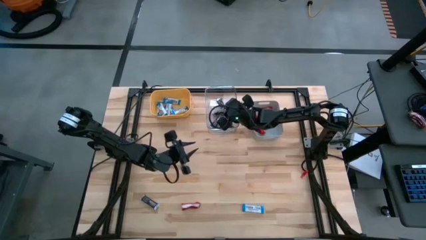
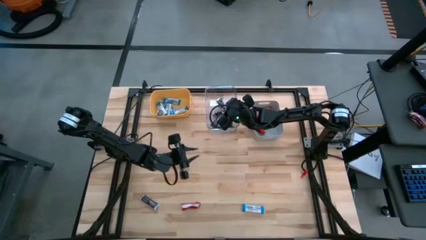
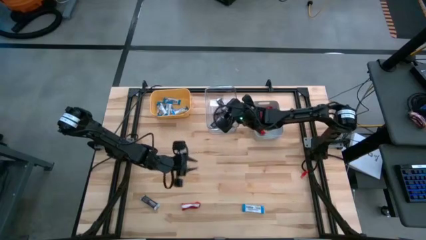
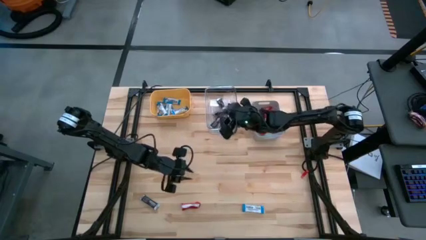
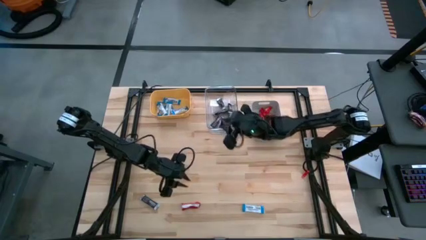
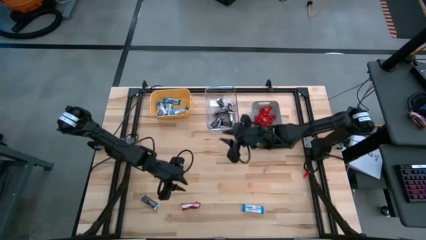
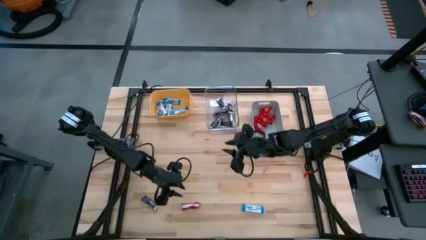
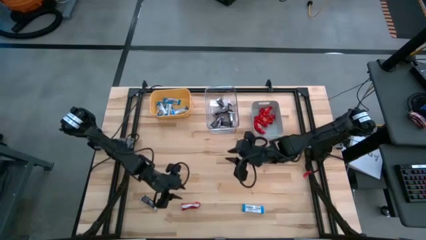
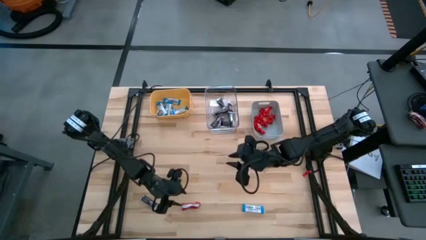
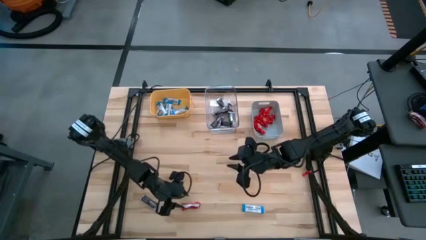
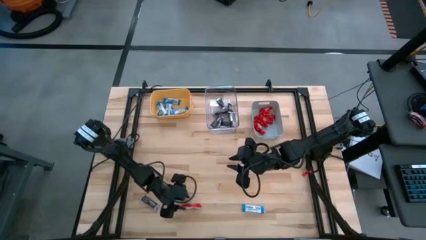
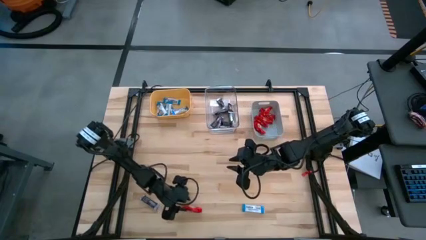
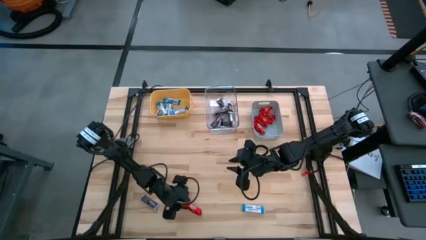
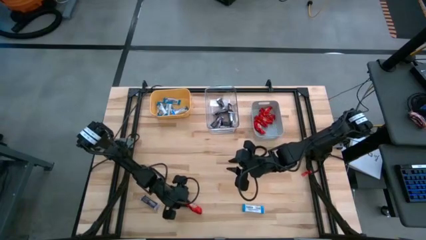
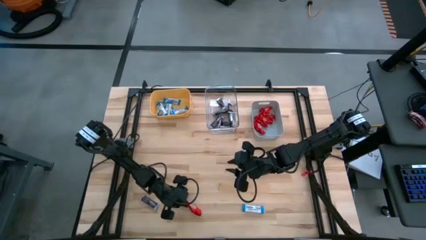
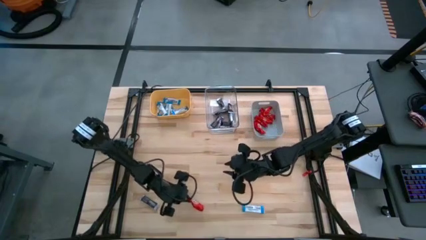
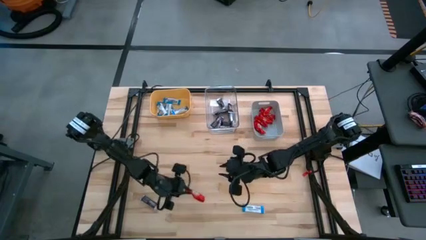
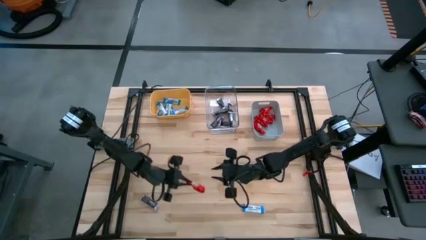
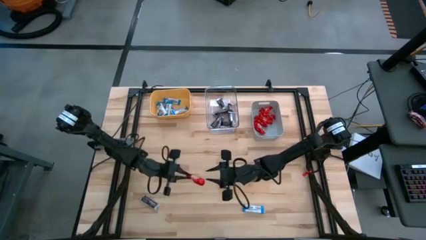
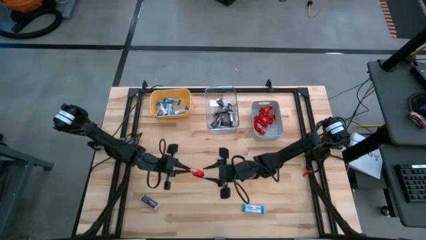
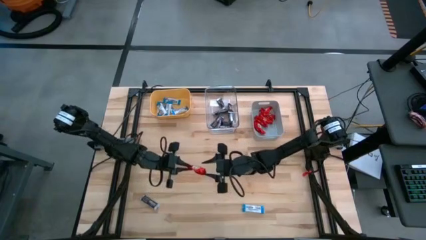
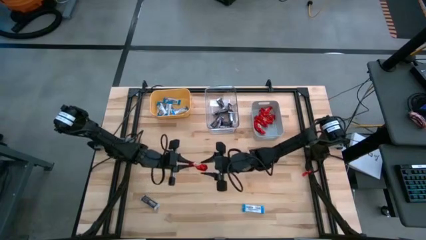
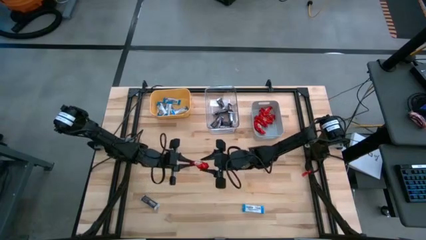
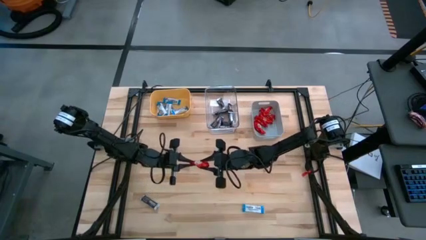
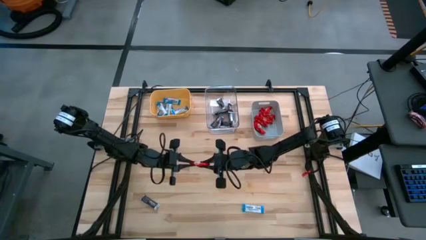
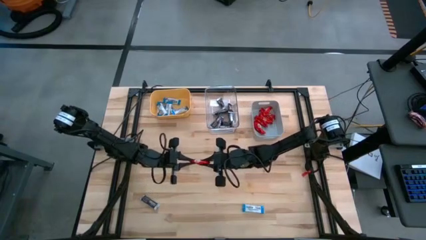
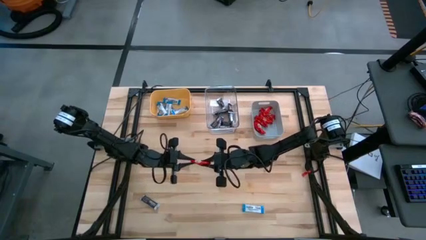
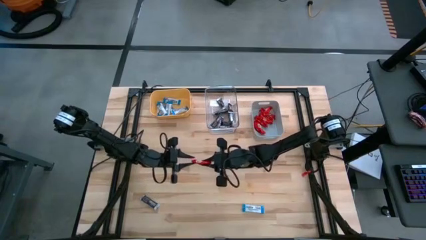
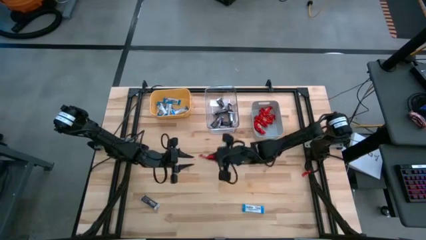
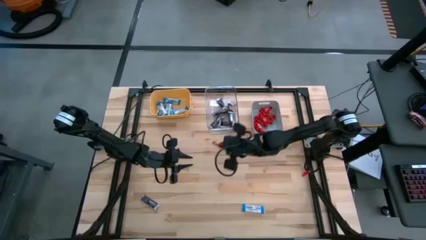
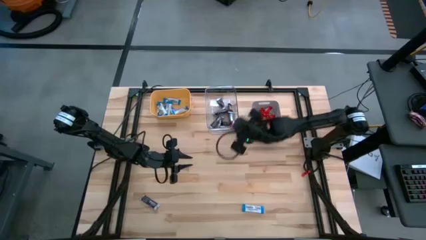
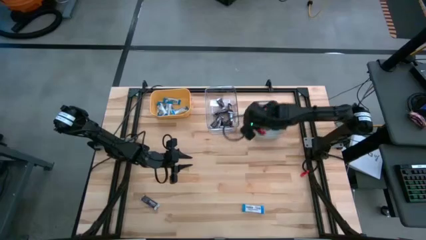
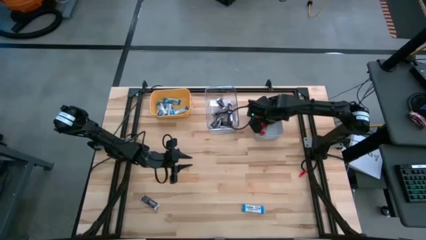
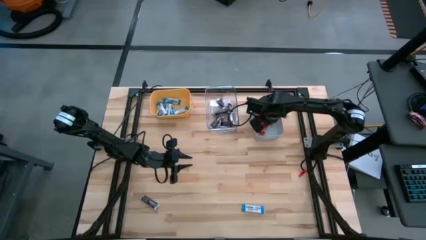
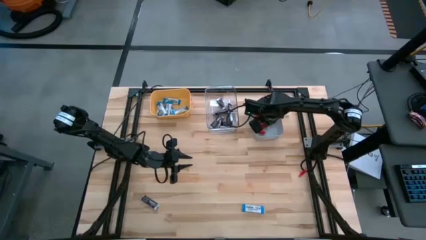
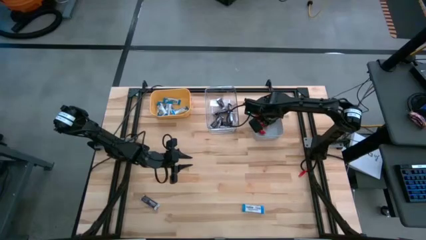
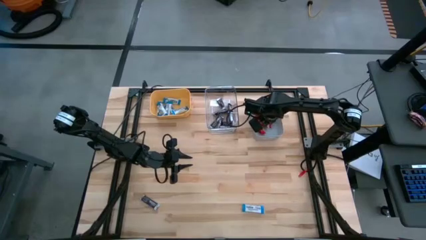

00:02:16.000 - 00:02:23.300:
Task: Sort candy
Put the red chocolate in the gray bin

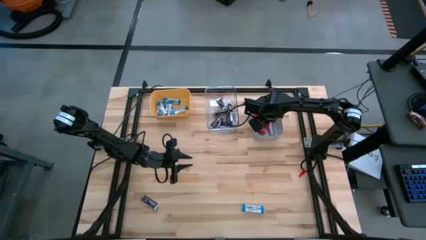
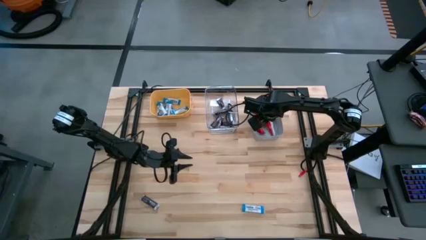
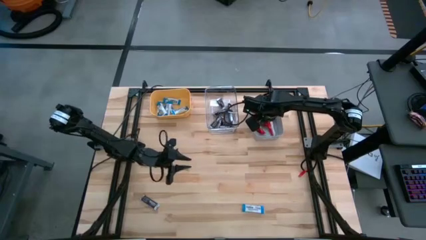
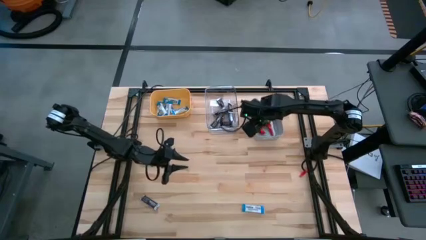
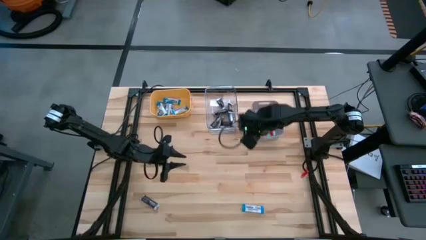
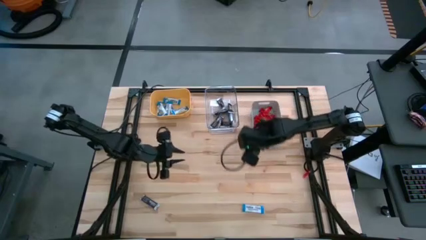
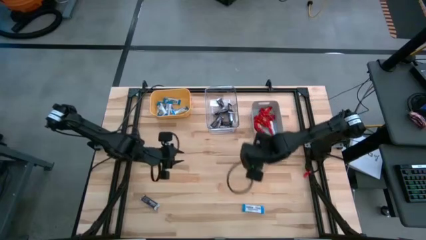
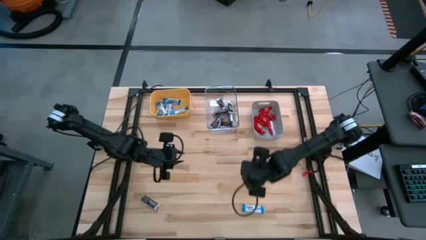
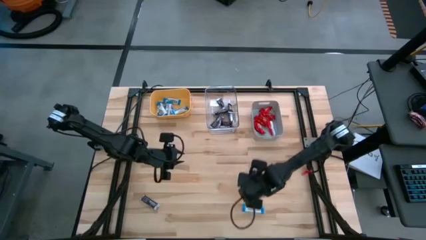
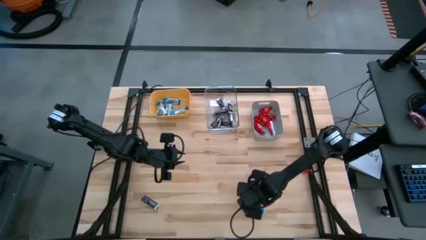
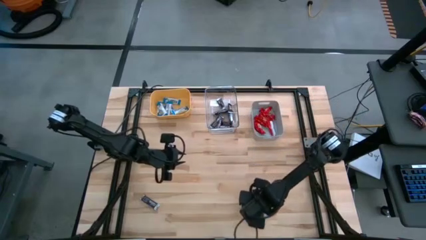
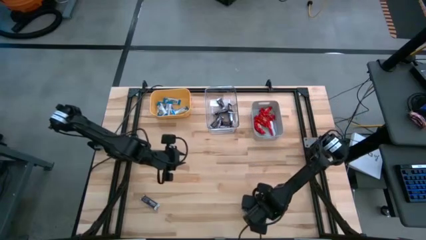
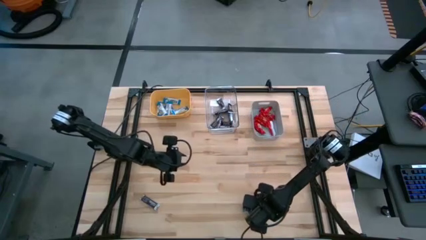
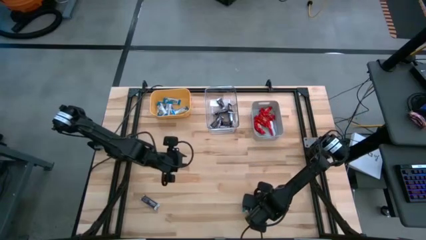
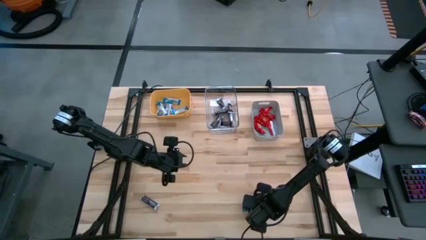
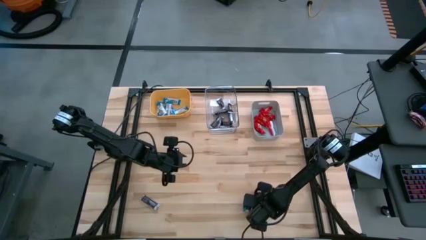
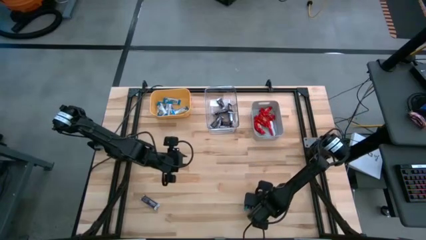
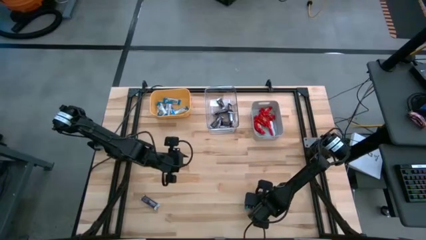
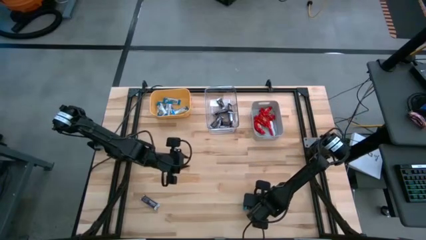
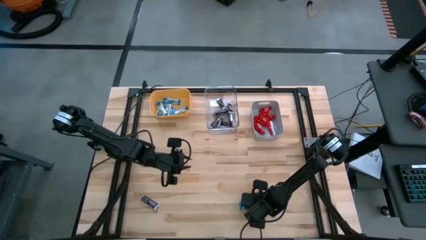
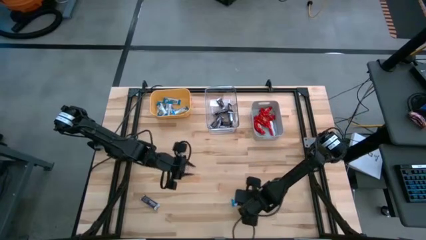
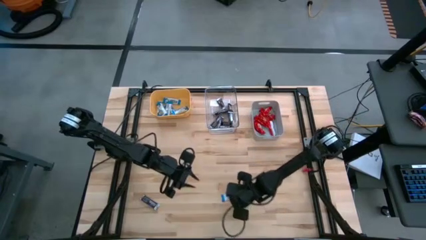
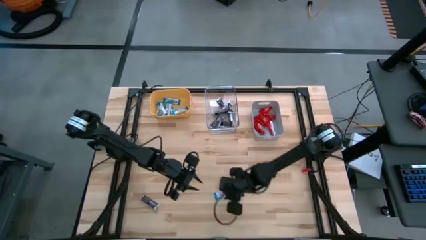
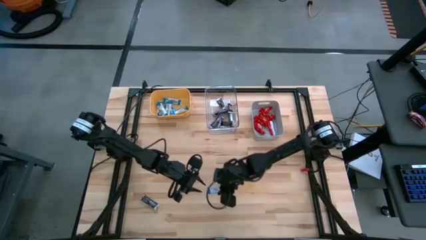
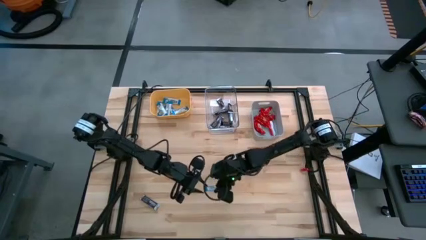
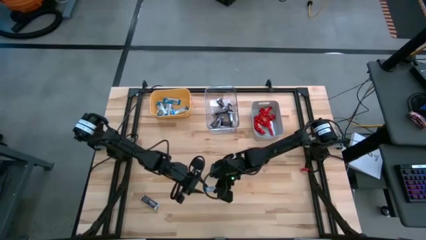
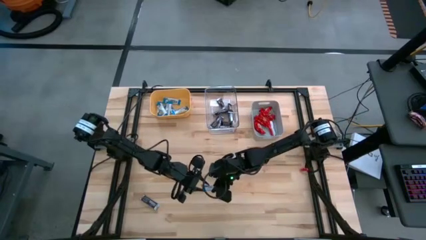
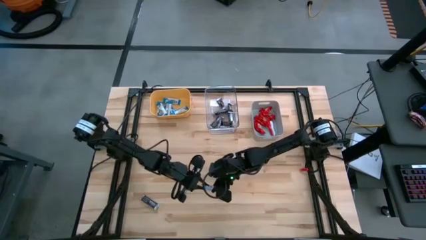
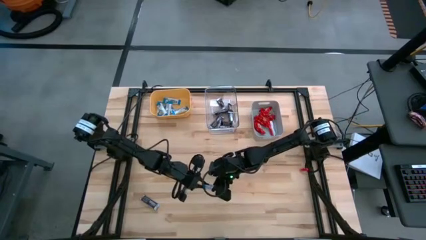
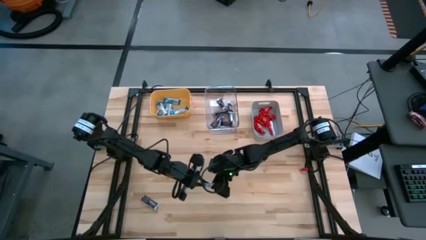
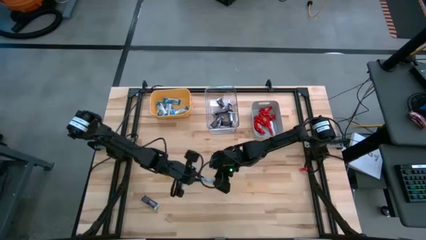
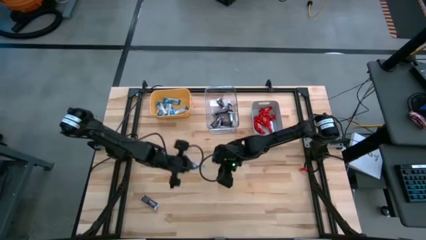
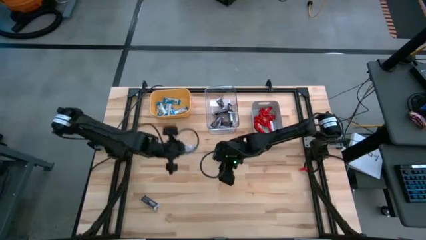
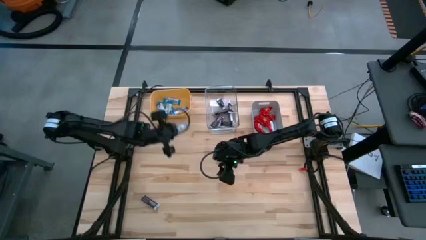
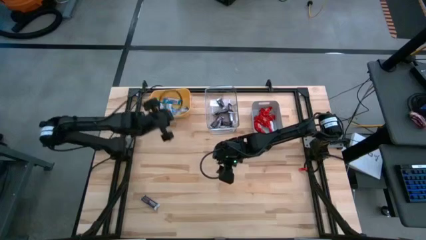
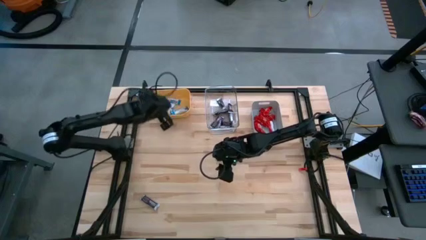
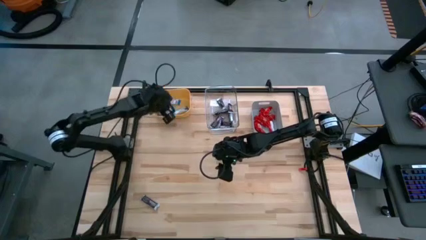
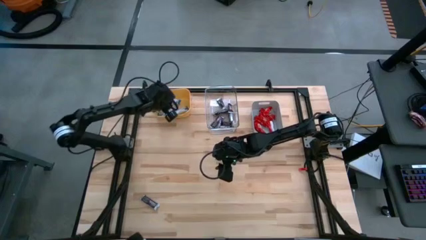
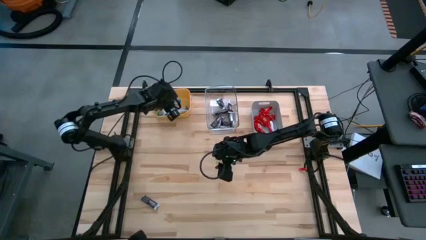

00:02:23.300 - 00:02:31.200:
Put the white chocolate into the yellow bin
